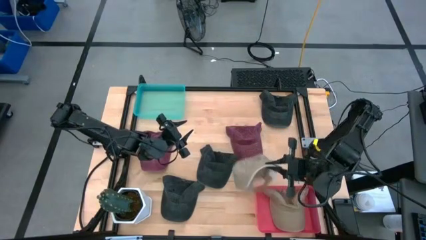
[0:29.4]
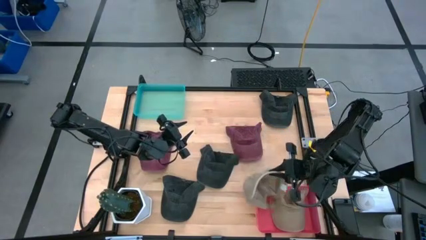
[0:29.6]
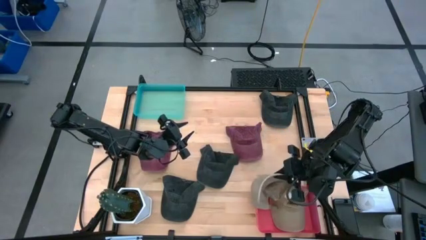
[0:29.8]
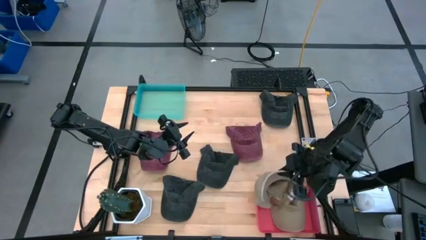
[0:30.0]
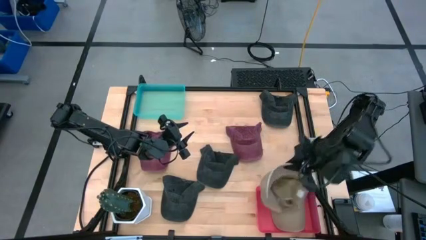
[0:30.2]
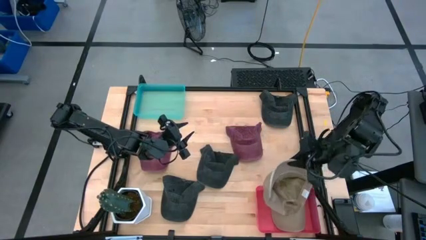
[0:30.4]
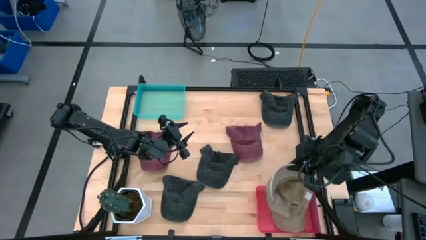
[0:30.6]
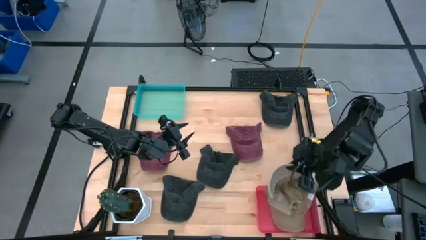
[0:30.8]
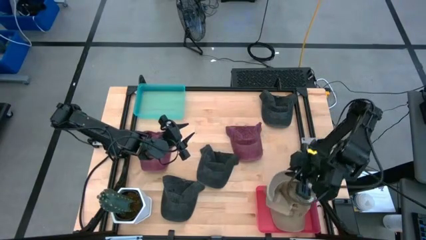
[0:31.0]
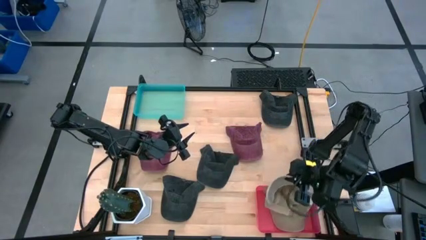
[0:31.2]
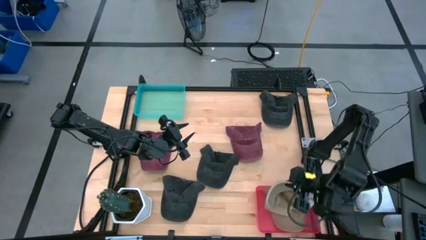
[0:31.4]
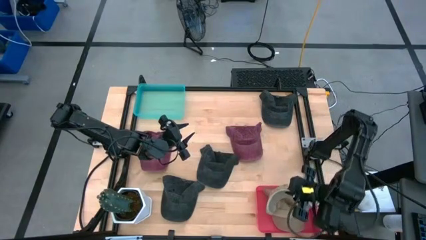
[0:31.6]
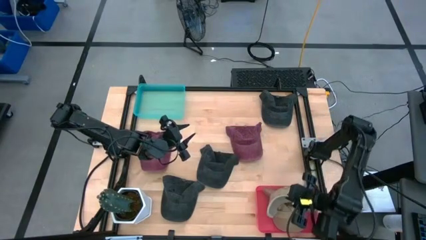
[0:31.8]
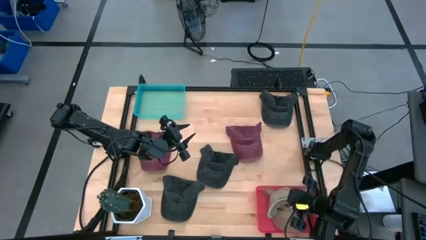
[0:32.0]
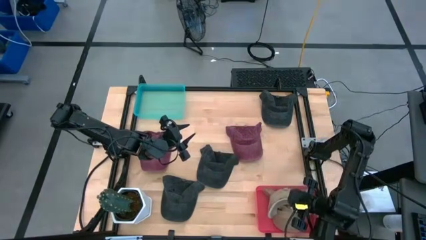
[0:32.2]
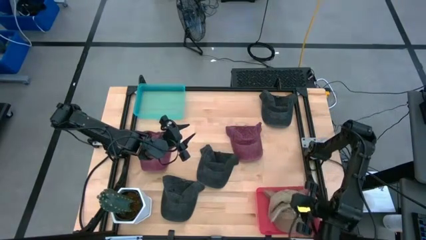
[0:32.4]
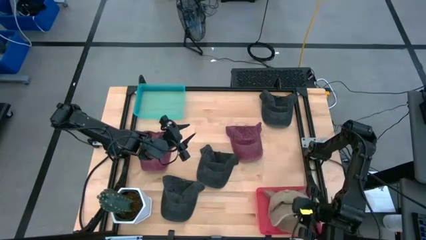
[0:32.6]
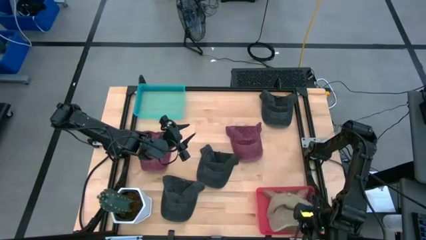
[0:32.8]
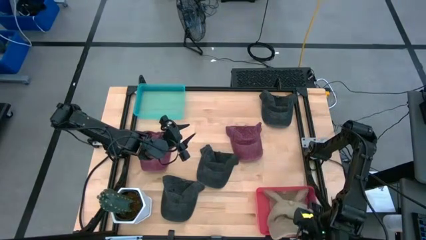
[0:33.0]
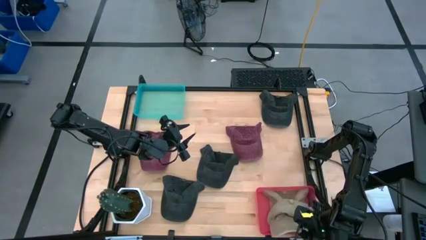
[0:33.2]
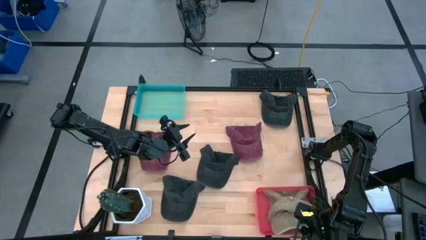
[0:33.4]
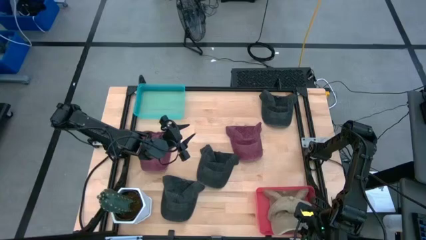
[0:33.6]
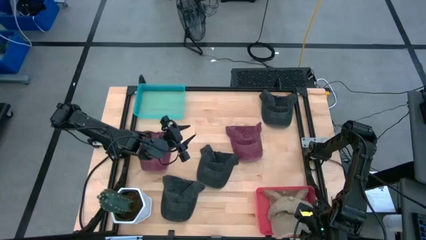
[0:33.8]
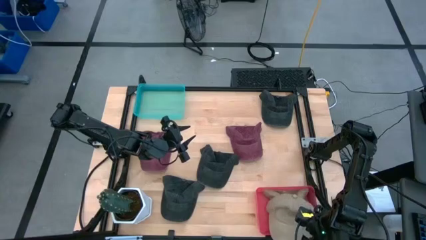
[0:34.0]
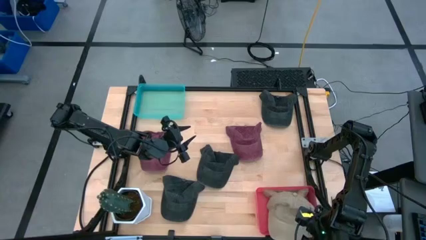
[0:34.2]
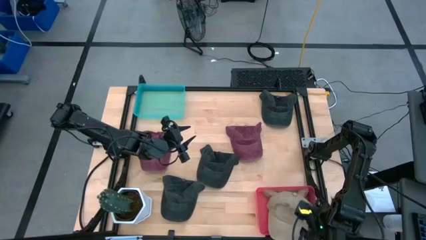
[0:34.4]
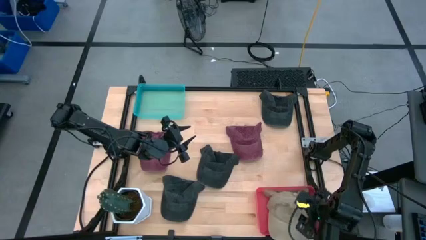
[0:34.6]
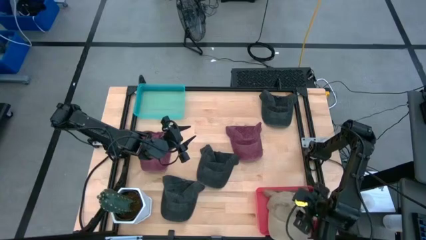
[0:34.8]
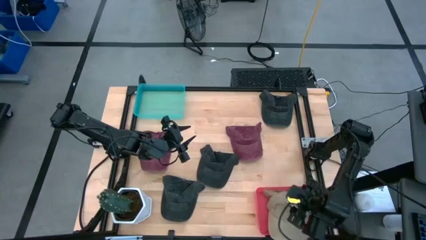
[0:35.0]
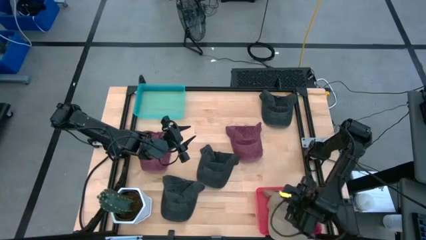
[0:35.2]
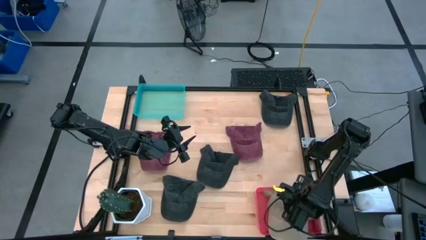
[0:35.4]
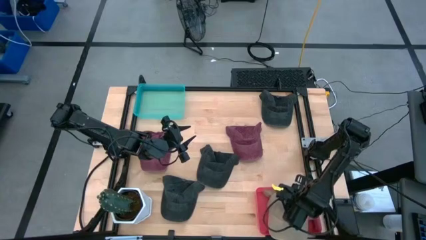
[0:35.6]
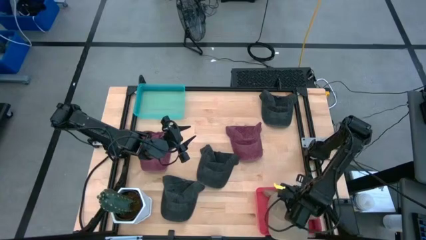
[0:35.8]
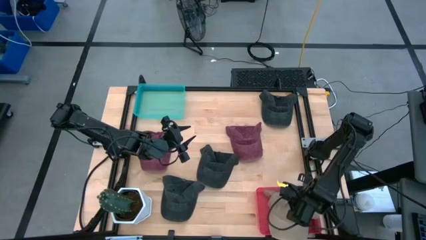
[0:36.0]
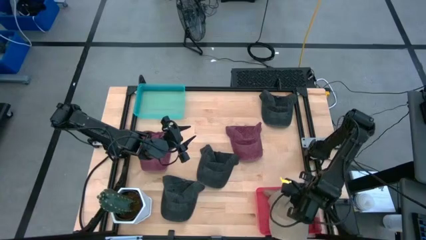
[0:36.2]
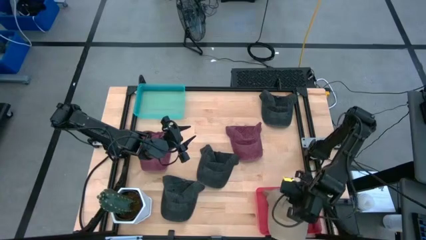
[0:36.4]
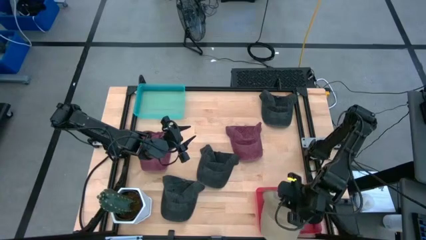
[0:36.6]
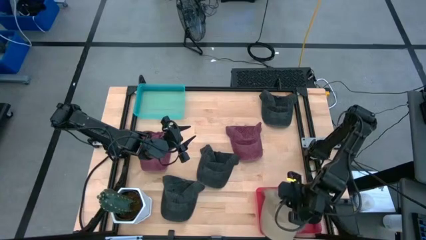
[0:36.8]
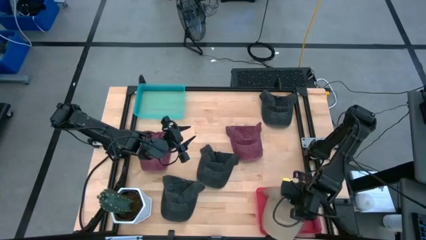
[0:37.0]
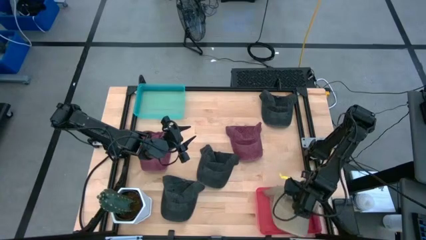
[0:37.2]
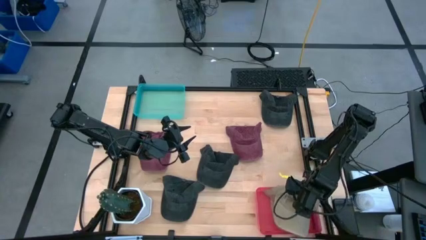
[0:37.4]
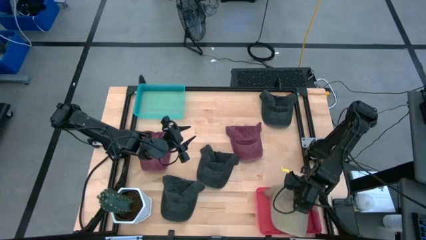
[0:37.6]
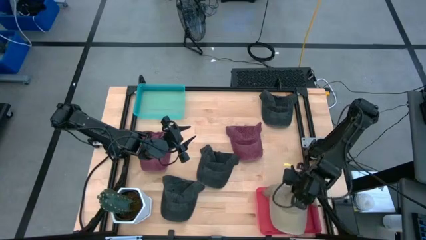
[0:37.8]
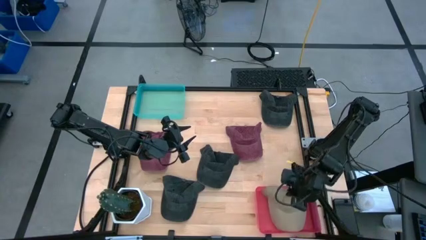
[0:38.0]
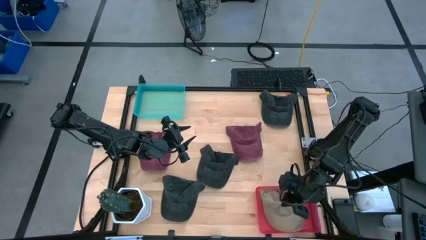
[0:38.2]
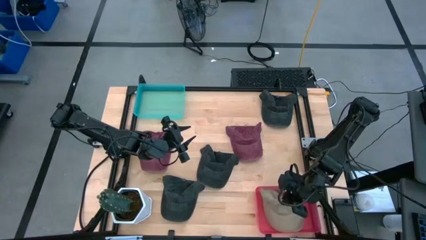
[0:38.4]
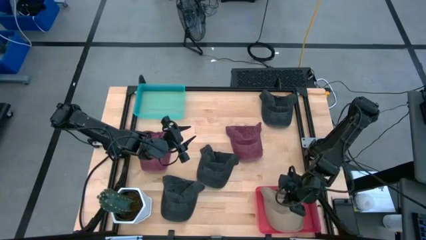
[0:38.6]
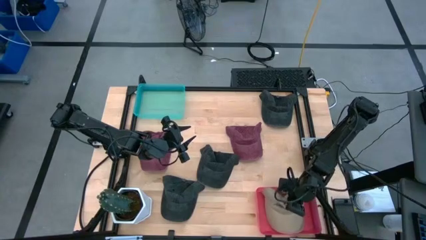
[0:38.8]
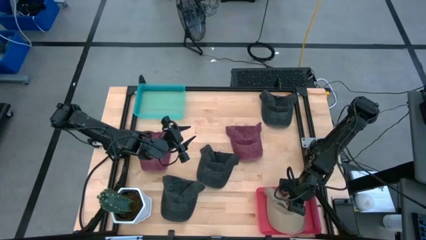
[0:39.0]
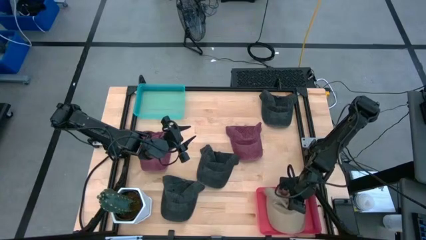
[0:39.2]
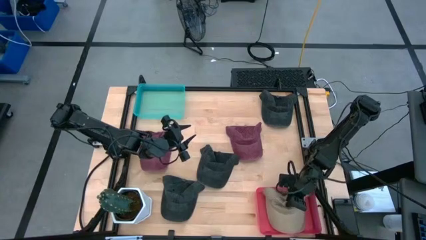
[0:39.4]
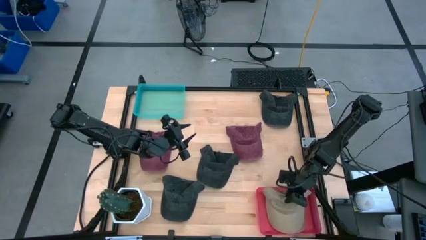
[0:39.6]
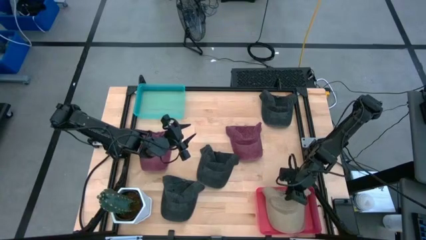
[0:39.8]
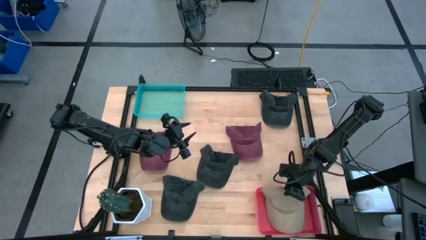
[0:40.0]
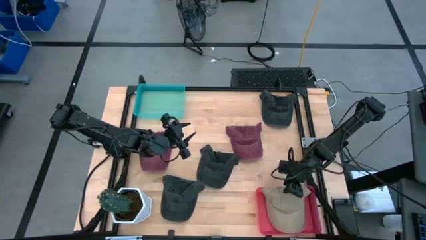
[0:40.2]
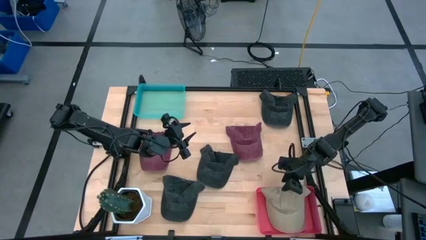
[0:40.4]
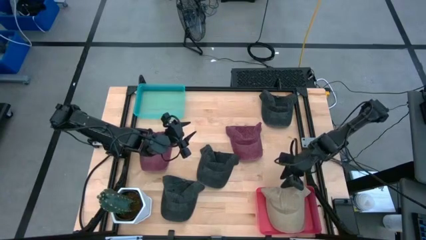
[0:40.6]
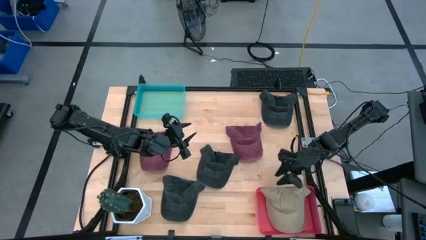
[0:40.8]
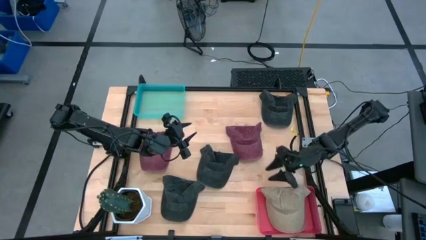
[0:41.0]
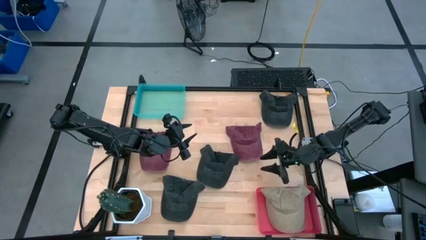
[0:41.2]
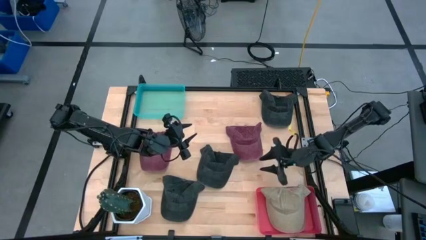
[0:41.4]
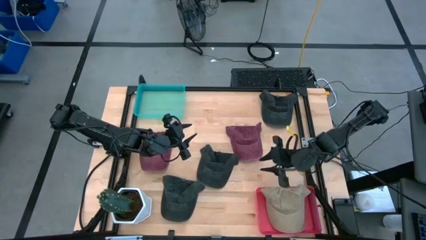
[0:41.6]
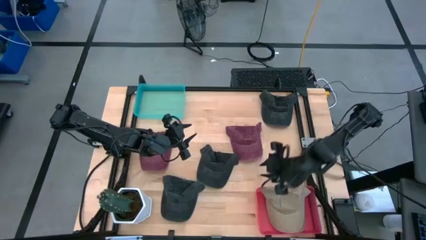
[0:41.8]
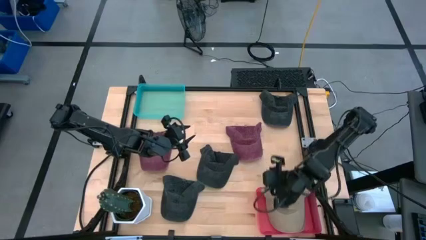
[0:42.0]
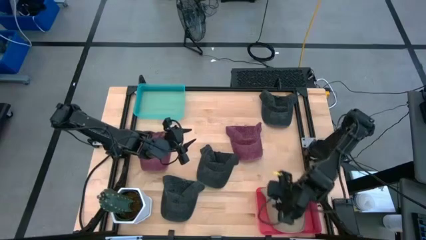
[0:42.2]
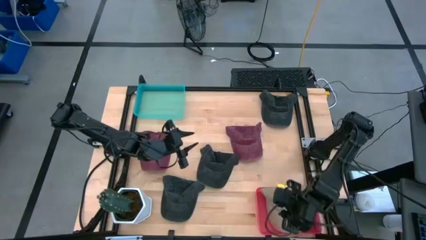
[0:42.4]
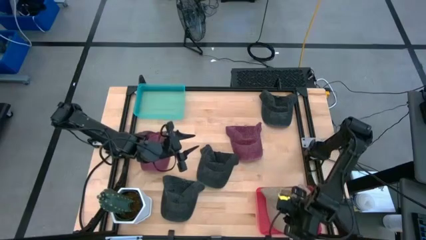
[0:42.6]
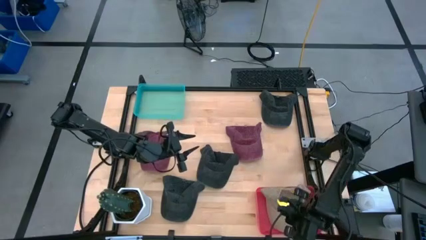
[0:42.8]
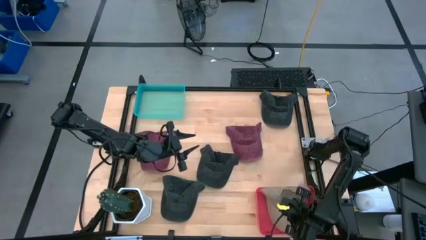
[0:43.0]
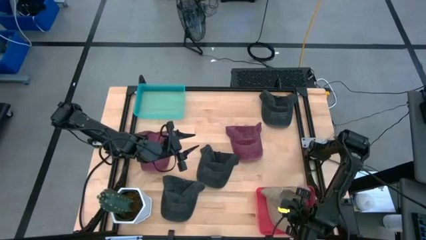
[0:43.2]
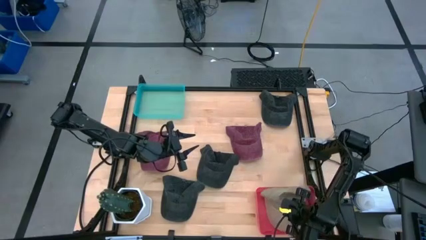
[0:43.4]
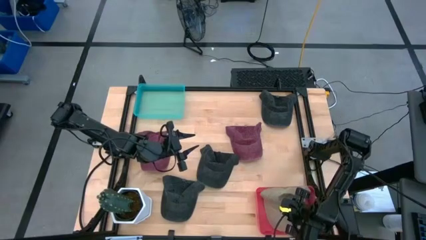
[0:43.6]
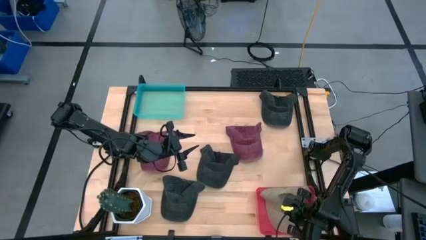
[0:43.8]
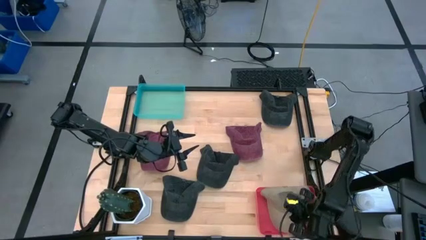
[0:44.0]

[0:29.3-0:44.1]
Task: Pick & Place hat
Put the brown cap into the pink bin
